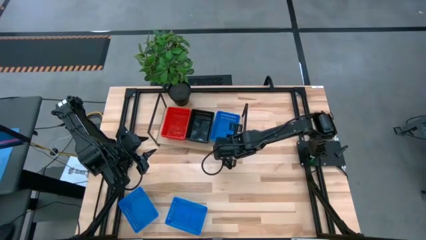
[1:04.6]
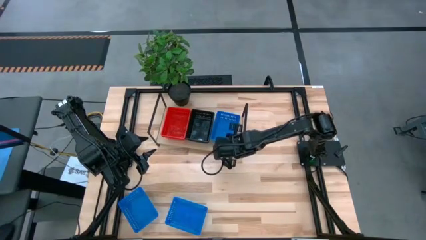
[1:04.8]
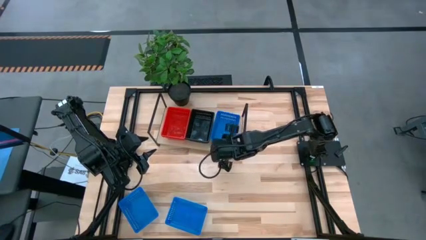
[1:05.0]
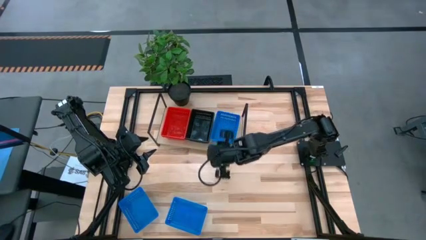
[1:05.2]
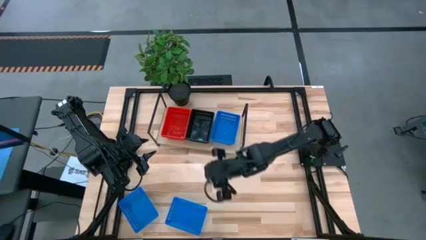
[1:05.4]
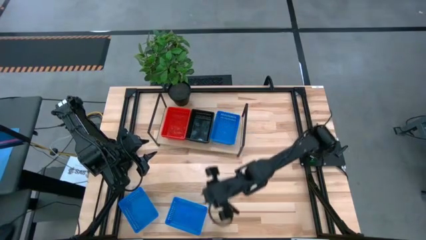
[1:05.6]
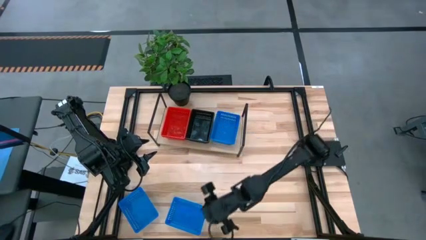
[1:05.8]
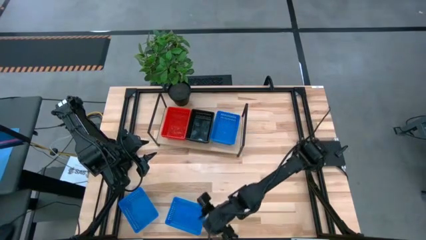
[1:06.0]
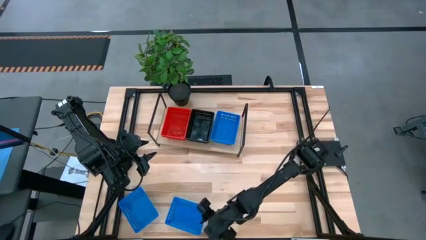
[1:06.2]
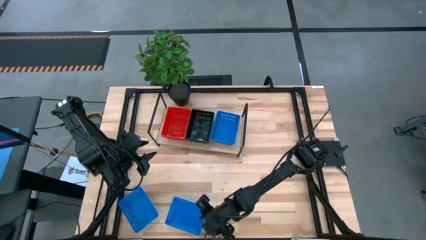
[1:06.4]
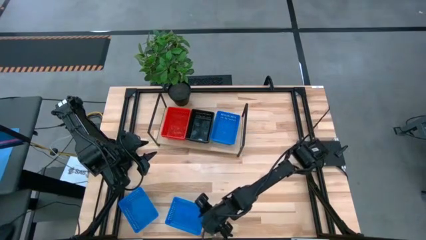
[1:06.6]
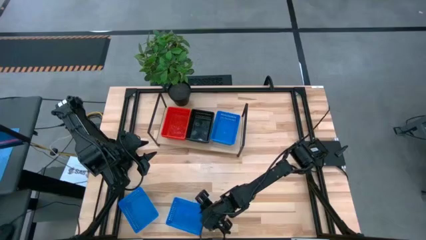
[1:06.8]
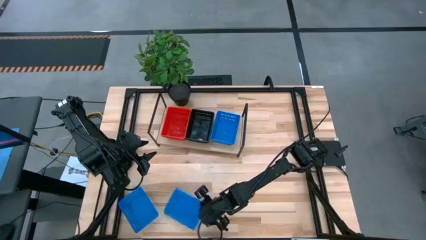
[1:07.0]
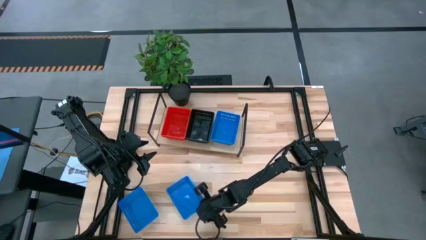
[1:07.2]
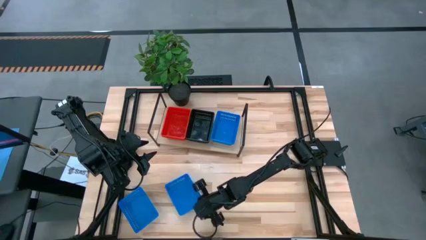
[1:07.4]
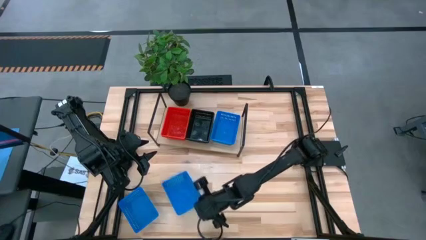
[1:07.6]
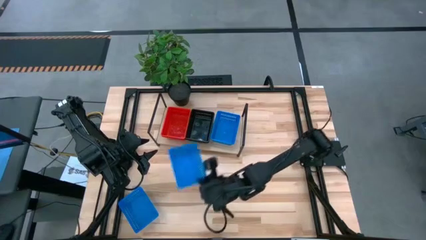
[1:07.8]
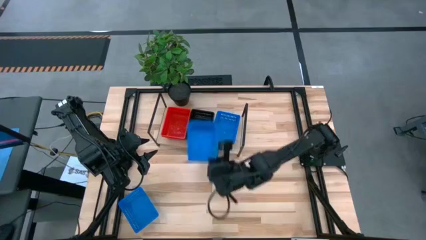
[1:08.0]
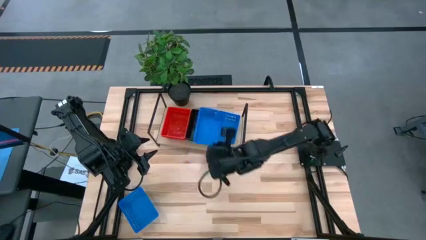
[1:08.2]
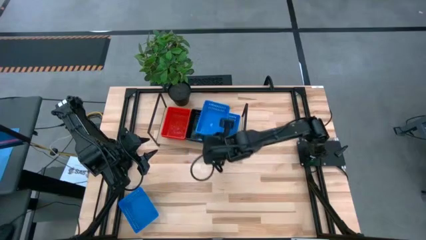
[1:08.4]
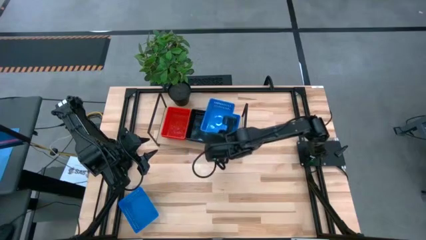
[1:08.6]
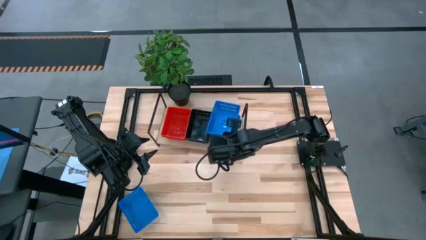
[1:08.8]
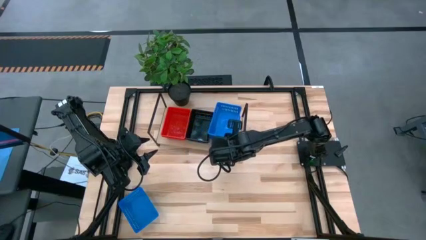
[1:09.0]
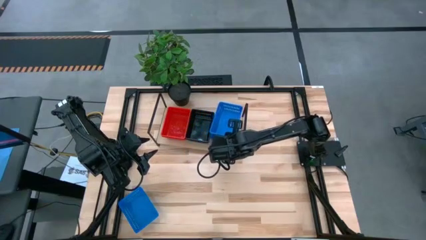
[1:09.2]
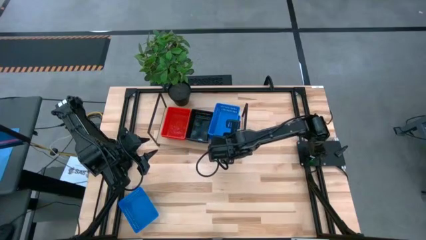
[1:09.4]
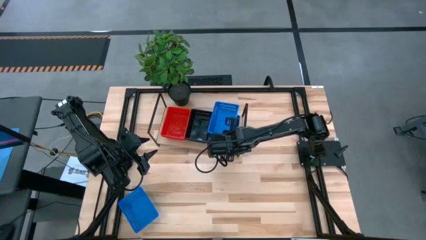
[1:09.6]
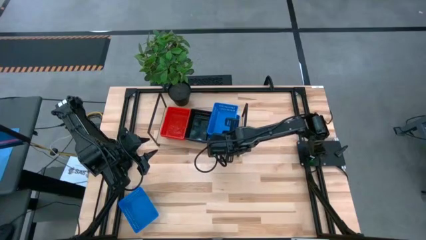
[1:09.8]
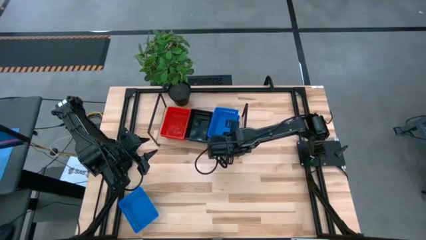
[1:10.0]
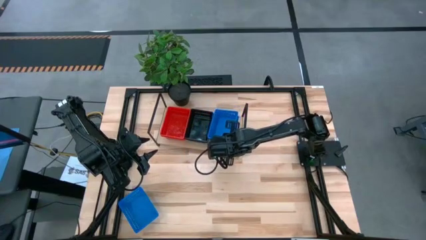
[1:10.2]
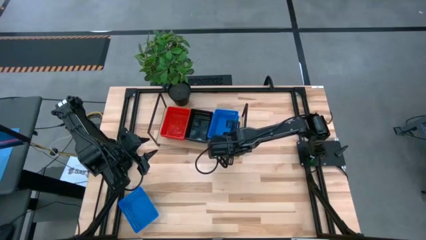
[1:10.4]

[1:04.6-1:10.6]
Task: Stack baskets on shelf by color
Stack the left blue basket on top of the other blue basket on the shelf

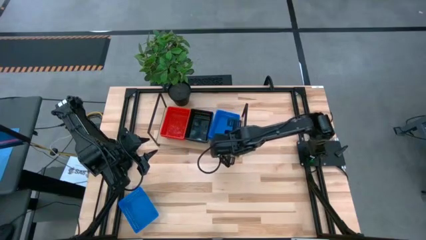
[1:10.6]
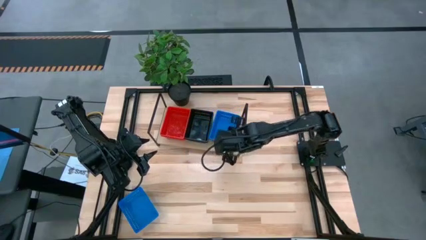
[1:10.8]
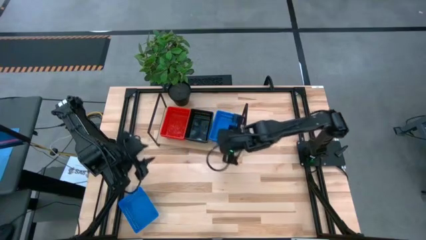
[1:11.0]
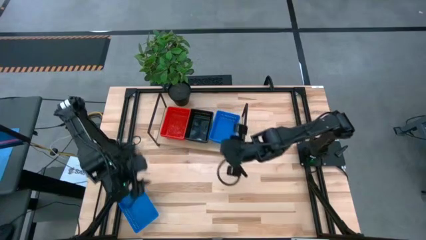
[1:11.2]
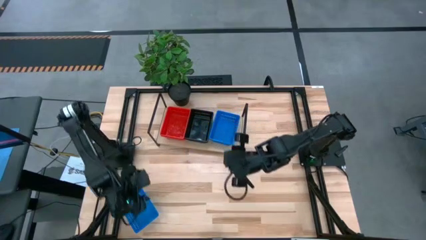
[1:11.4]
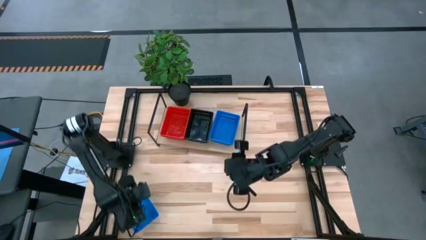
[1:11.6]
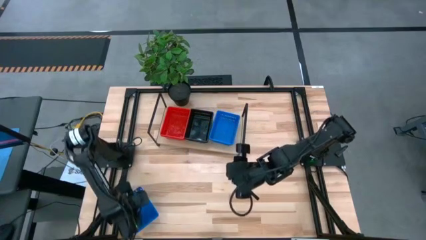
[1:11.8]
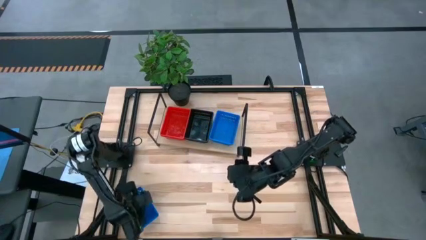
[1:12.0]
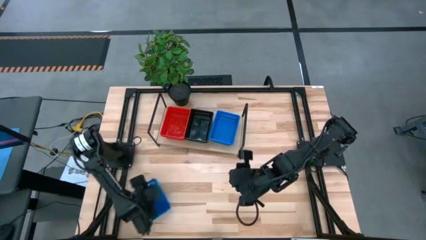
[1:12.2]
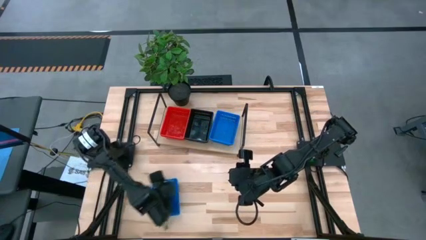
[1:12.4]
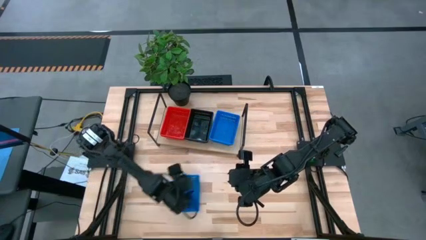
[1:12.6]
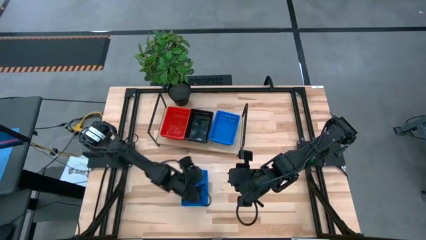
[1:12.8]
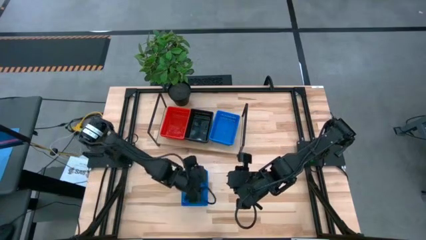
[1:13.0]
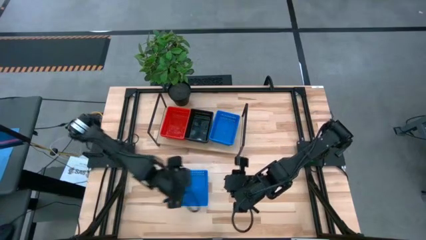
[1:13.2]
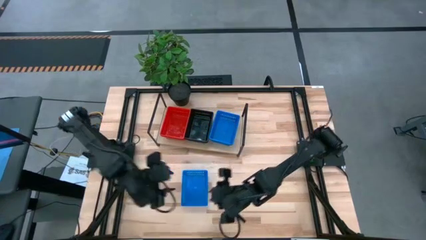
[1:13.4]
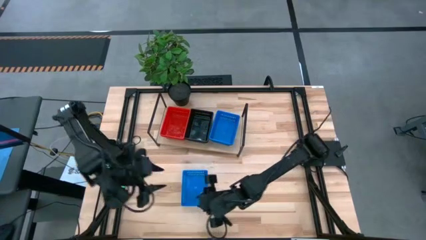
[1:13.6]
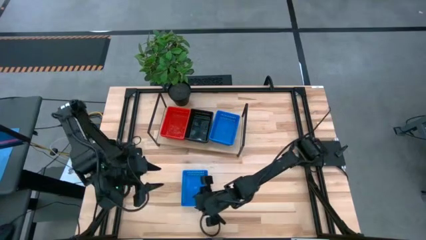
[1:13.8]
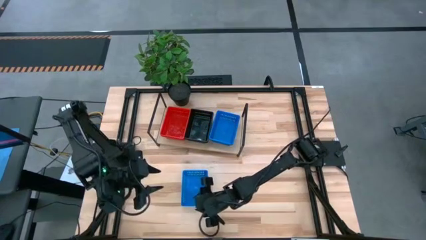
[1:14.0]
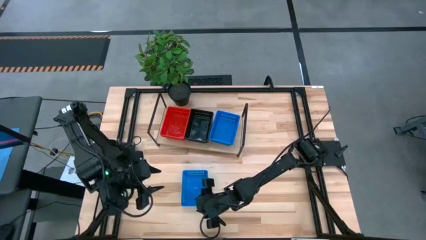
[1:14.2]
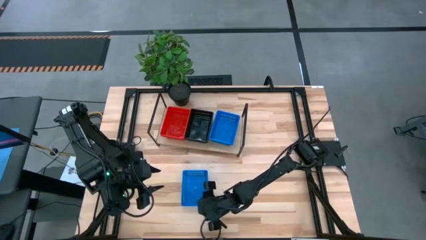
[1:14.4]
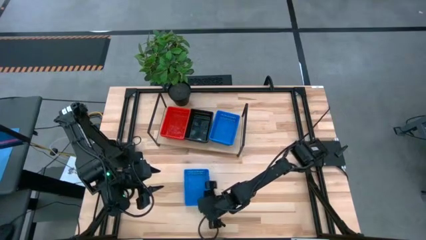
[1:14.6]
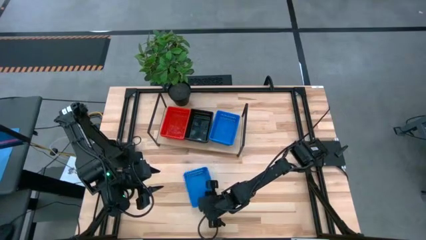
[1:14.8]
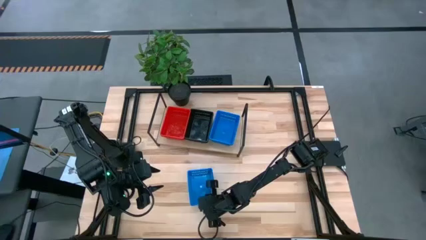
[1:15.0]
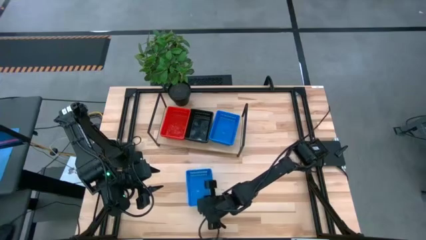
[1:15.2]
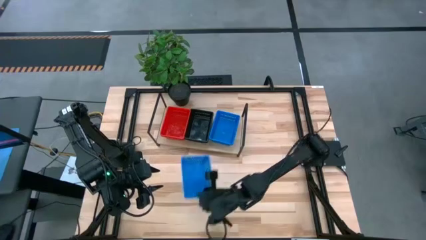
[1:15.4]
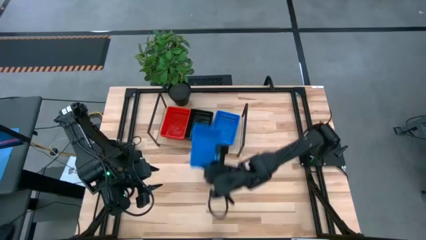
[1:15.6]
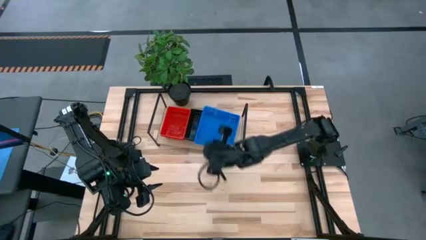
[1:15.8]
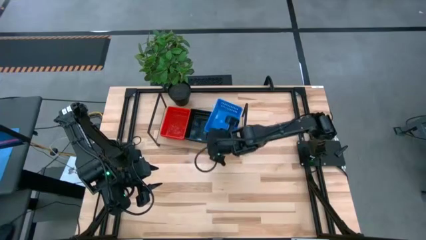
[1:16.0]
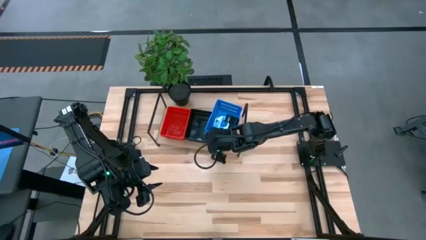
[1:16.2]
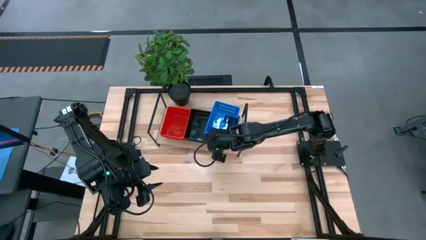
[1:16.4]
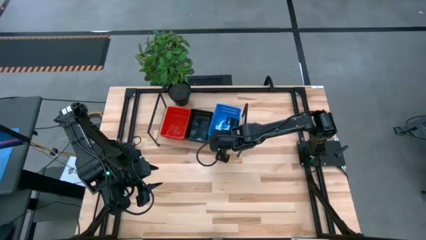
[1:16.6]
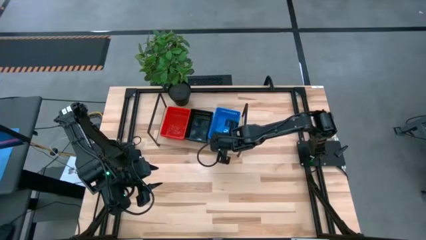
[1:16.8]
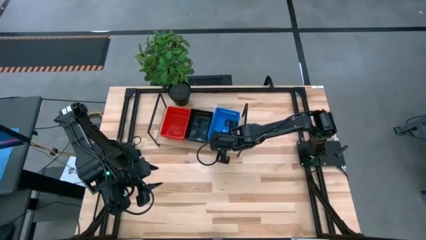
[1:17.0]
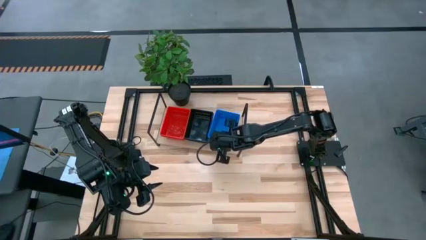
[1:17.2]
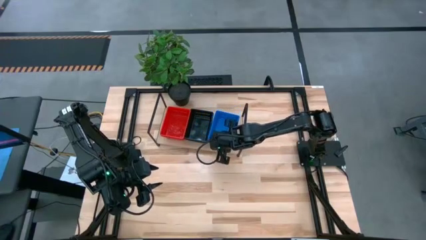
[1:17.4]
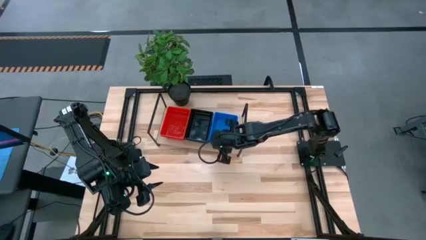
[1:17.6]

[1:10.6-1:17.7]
Stack the blue basket on top of the stacked blue basket on the shelf

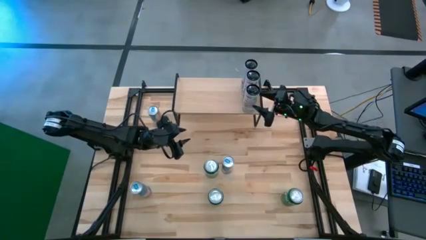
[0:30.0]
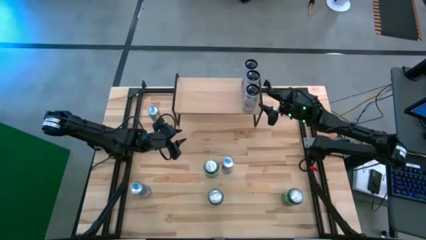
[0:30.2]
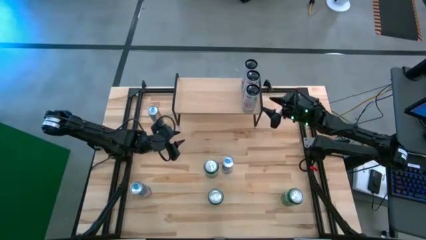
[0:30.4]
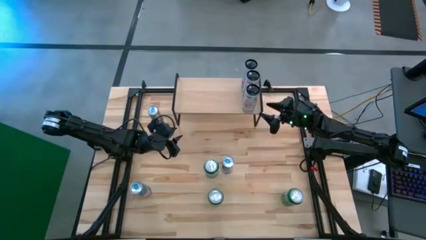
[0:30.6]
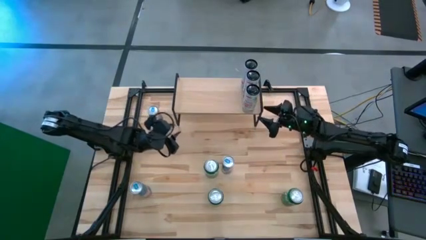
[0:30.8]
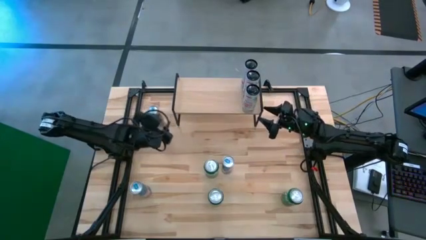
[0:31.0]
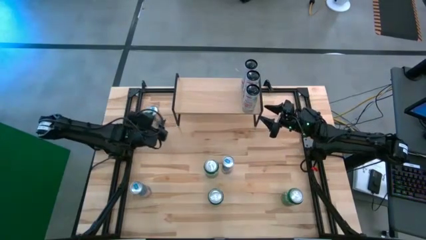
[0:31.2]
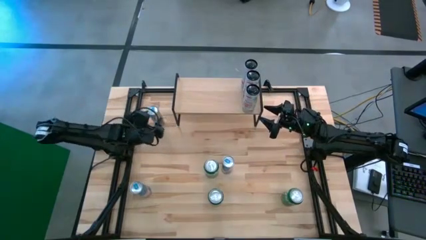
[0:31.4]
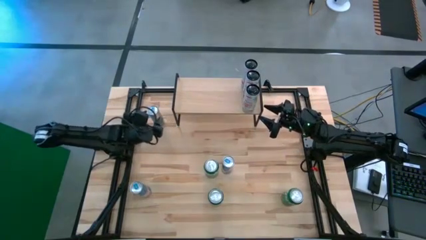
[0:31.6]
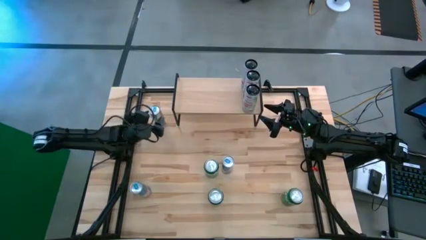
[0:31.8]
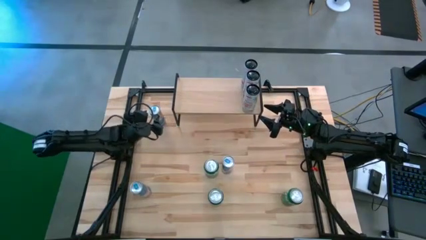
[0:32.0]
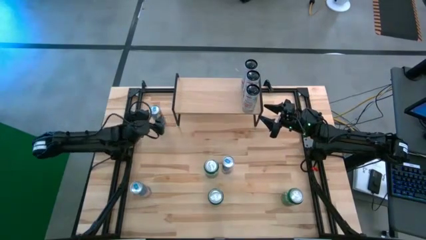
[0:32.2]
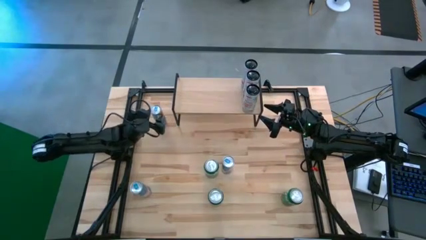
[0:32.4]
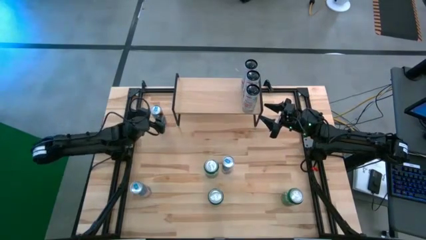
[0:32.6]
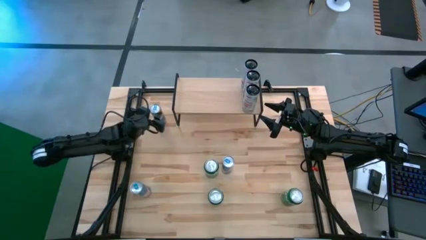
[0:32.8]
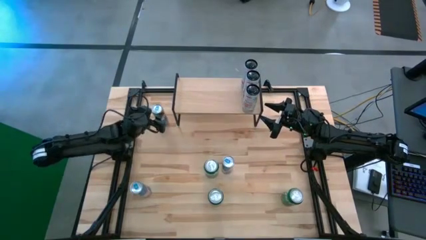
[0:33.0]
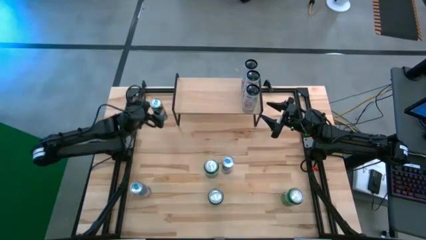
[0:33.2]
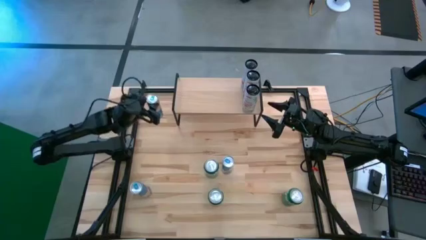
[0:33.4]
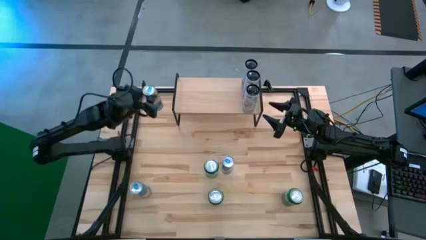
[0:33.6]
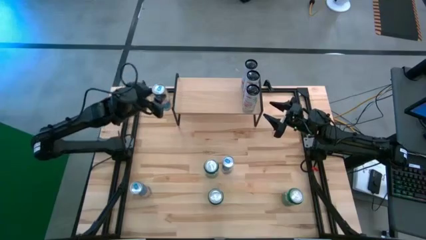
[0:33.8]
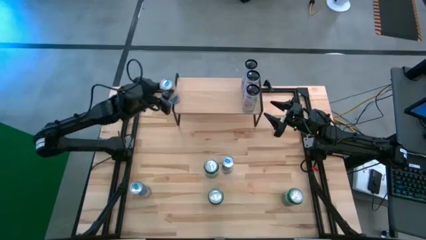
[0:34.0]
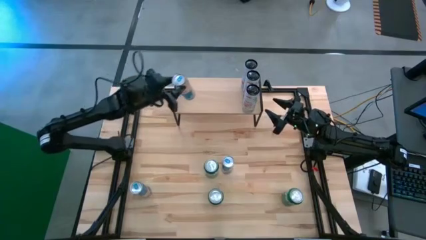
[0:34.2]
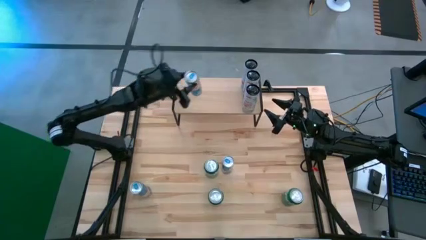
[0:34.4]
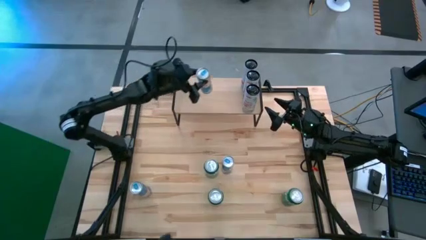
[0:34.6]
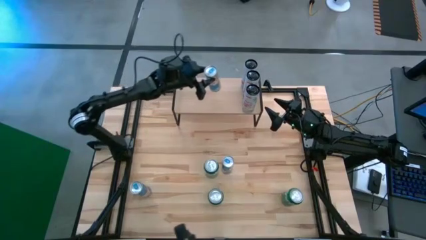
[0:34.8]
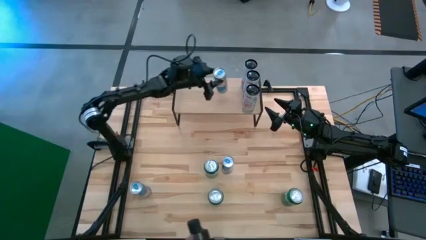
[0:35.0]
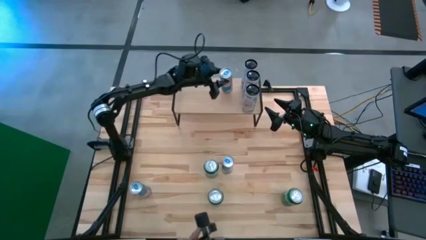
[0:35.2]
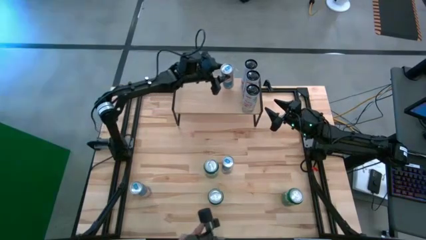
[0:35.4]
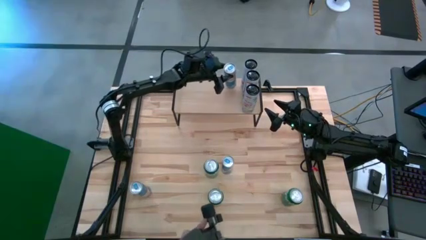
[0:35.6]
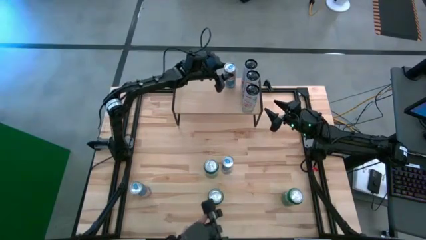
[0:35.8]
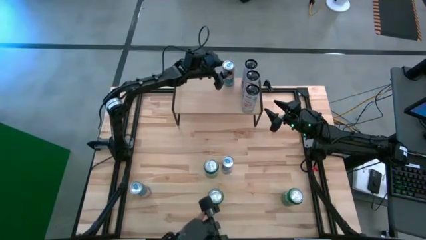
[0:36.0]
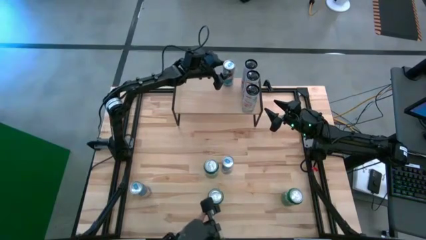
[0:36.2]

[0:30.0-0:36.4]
Task: Place canned beverage on shelf
Put the top left blue soda can on the shelf
